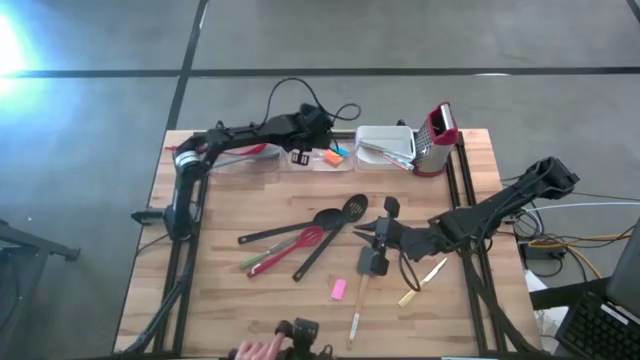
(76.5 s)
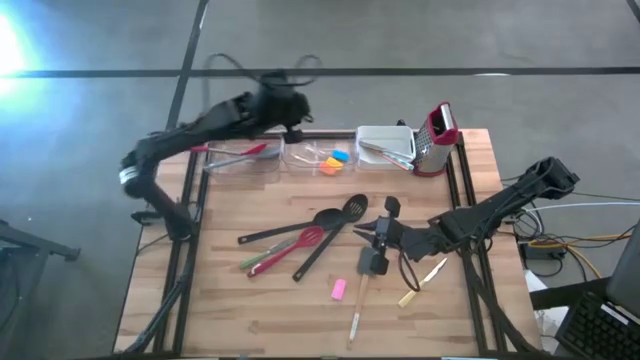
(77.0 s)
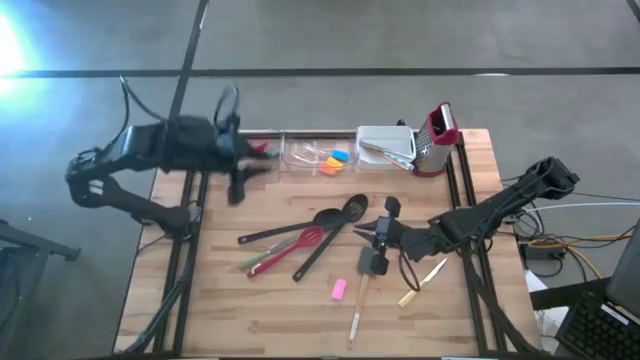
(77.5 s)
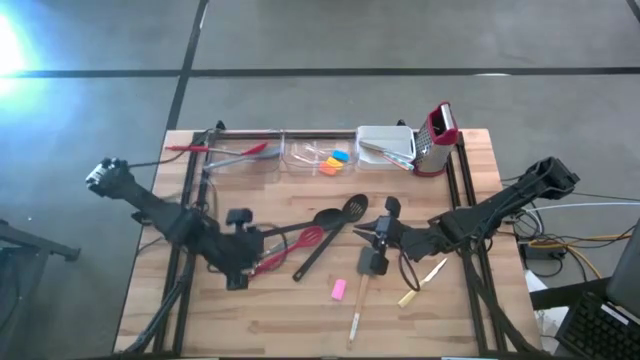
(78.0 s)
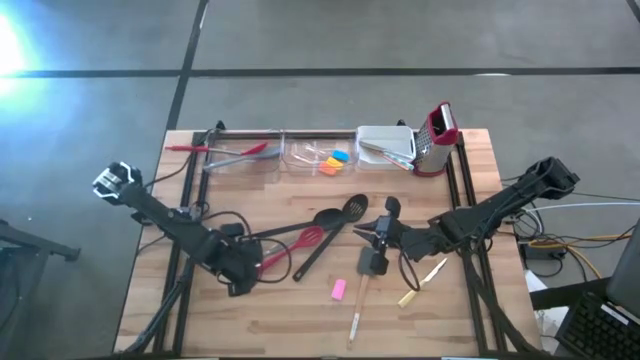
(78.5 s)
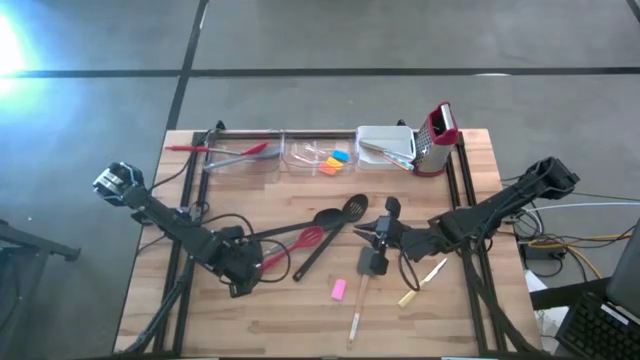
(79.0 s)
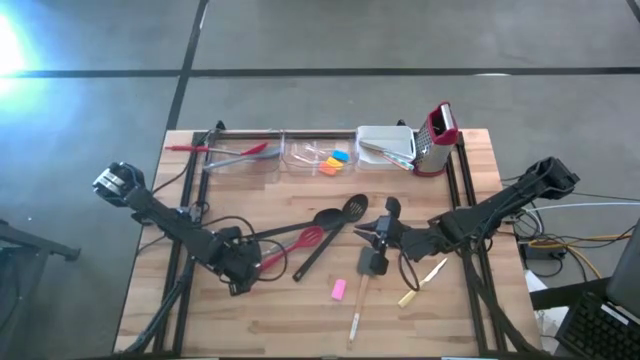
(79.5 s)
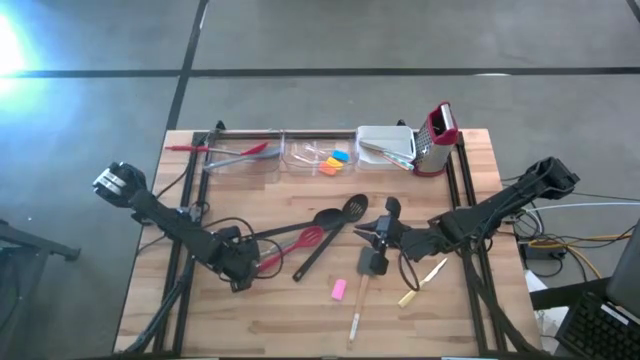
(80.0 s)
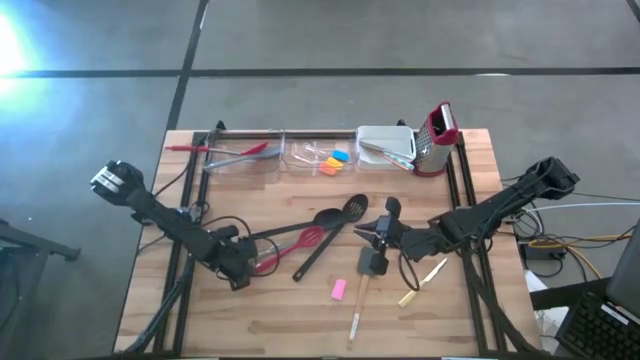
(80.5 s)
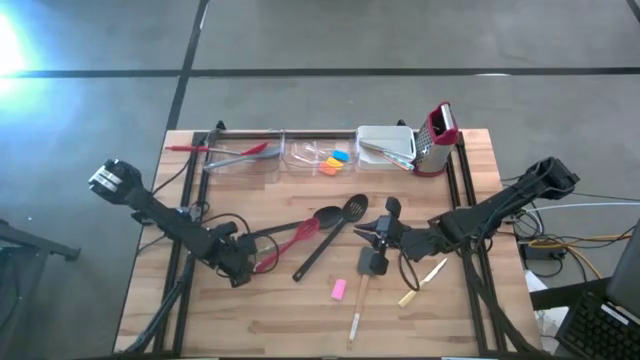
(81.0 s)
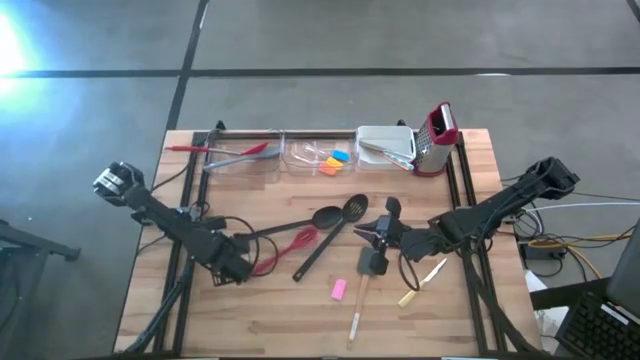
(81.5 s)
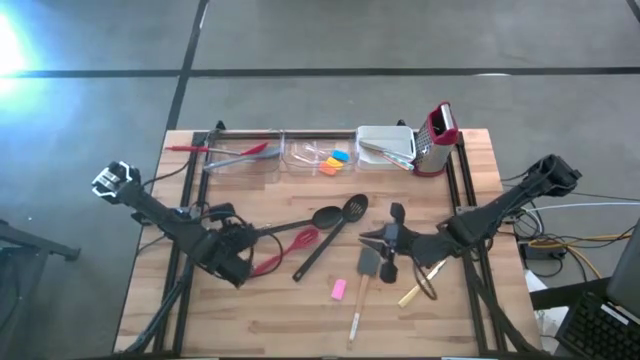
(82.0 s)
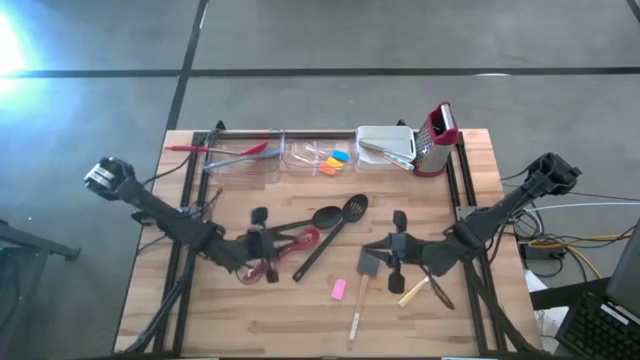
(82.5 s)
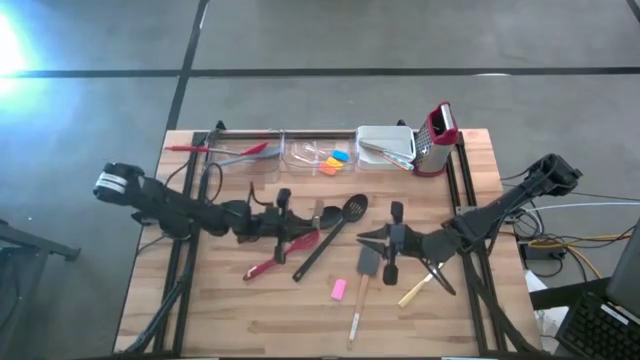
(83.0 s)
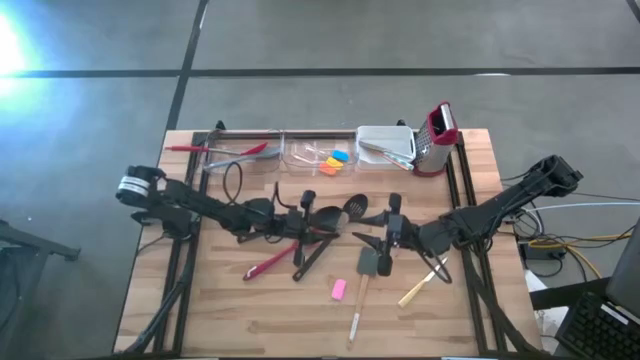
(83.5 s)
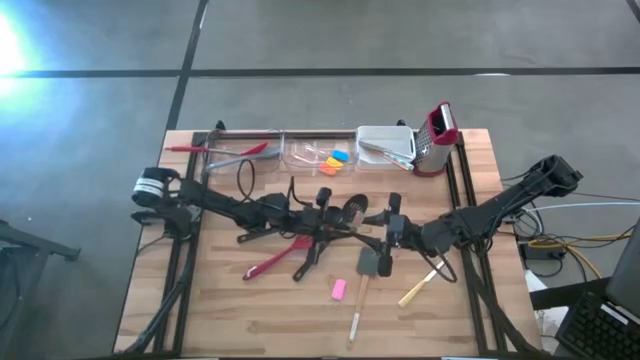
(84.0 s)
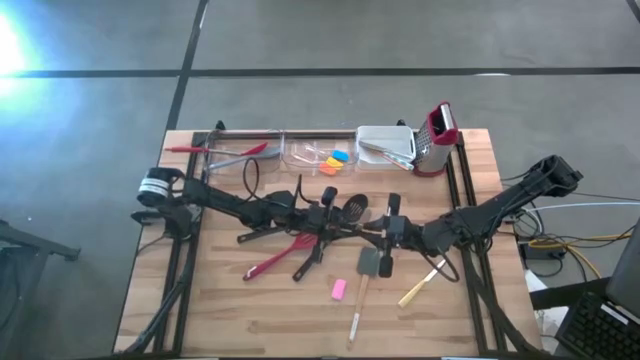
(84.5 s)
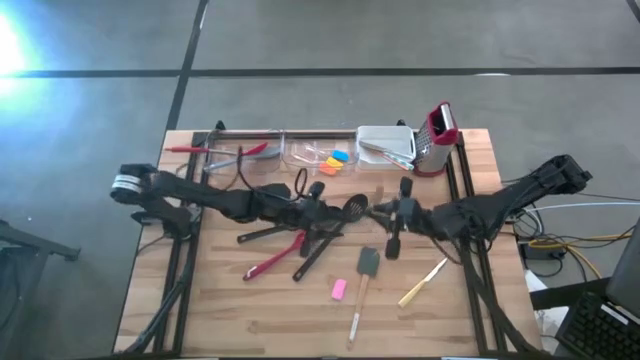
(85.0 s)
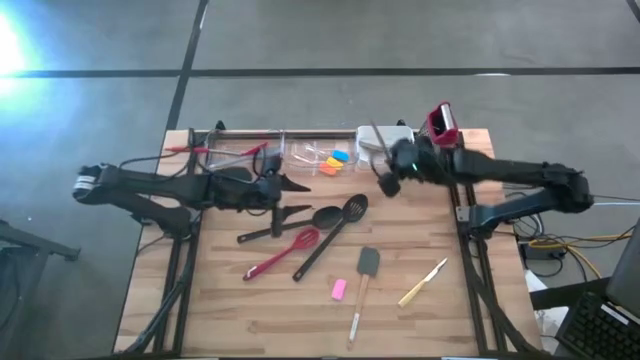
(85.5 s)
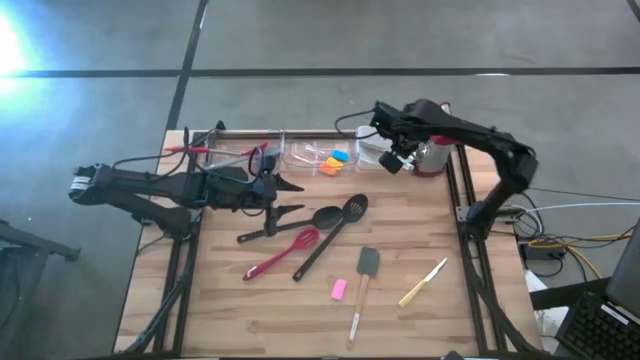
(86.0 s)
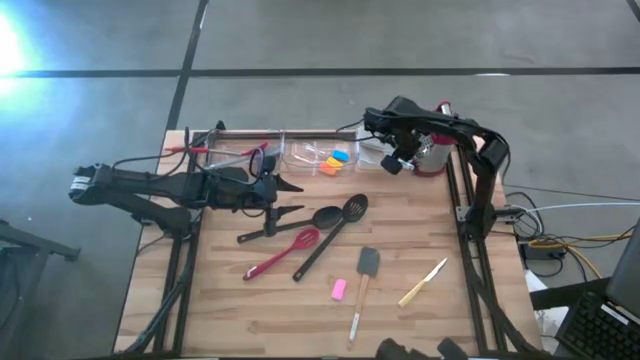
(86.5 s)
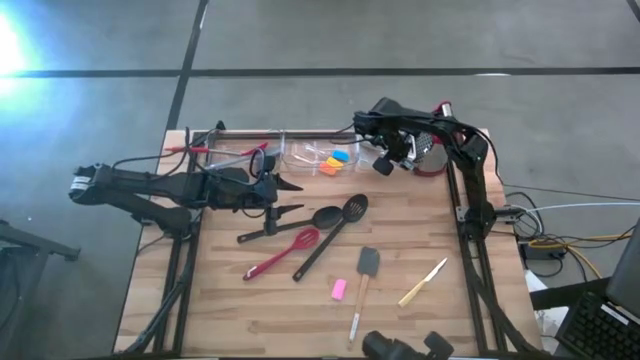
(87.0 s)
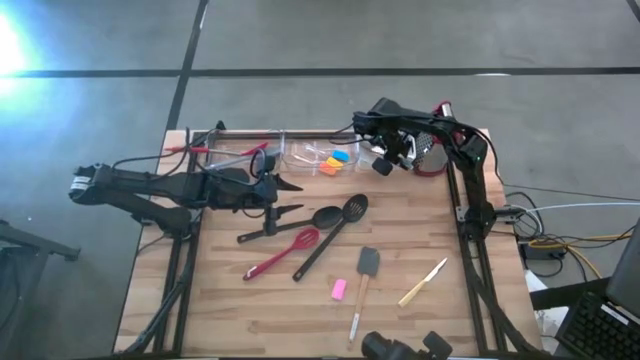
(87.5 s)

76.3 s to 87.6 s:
Task: Pick & Place Kitchen Items
Put the green table knife into the white bin

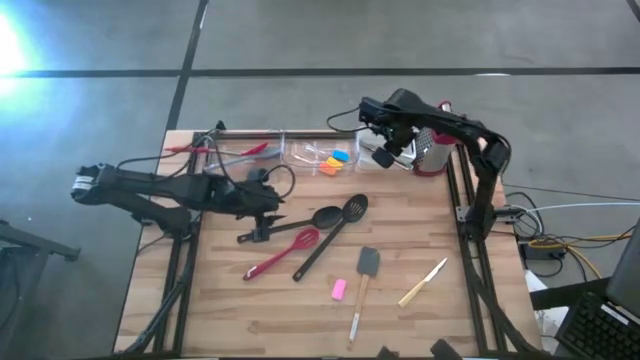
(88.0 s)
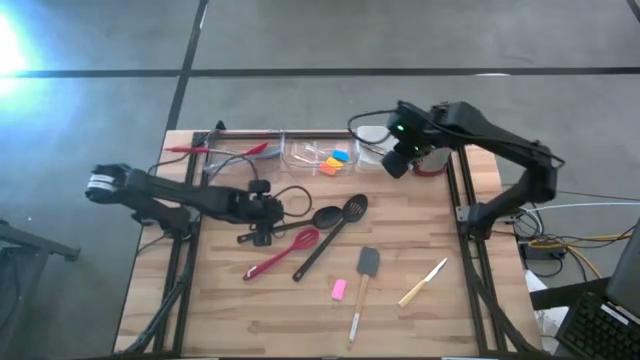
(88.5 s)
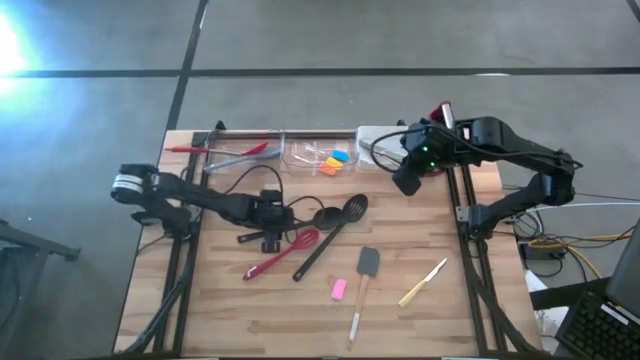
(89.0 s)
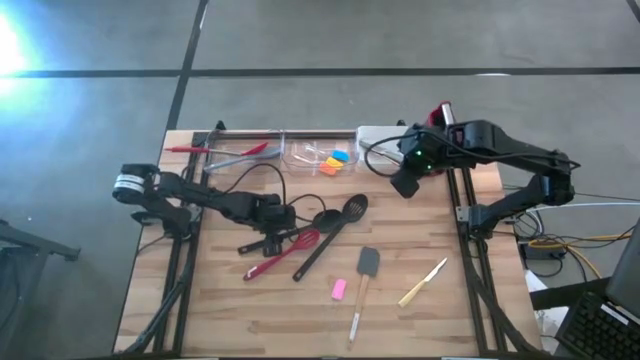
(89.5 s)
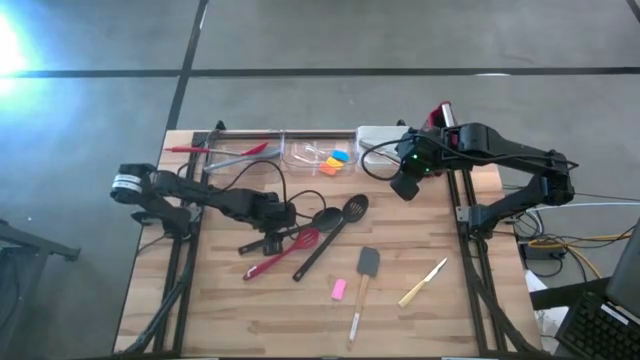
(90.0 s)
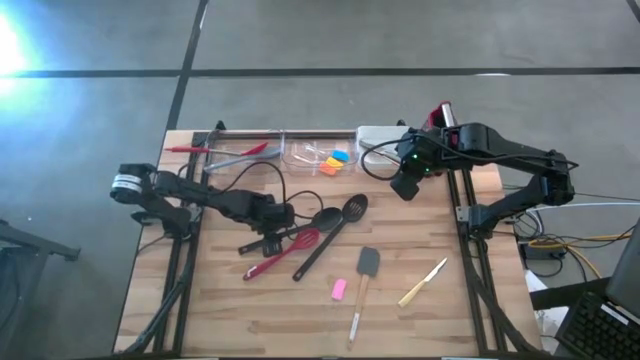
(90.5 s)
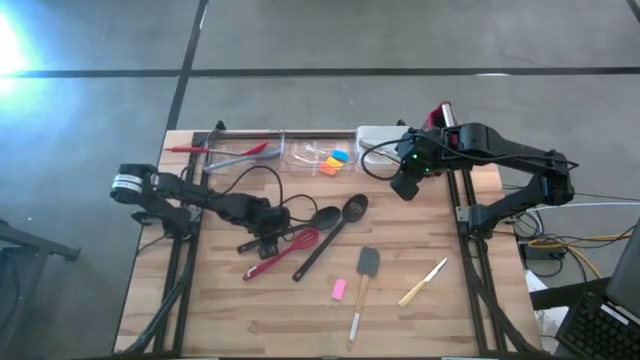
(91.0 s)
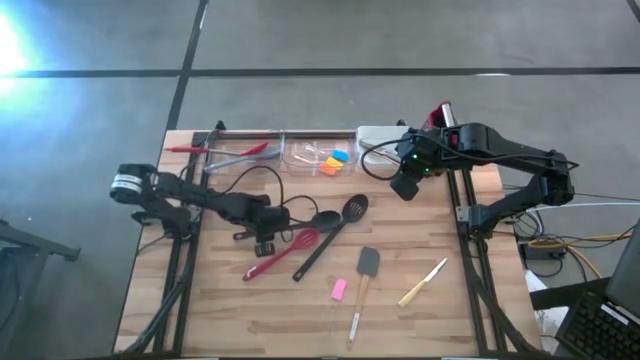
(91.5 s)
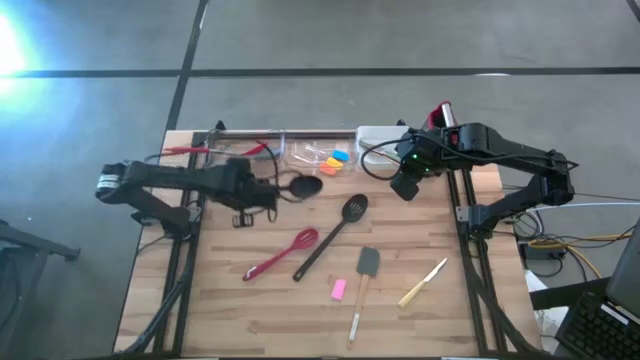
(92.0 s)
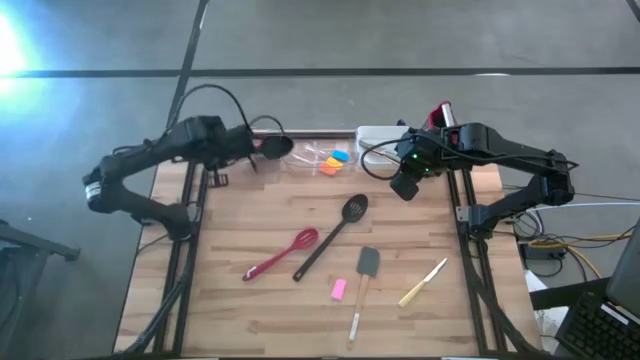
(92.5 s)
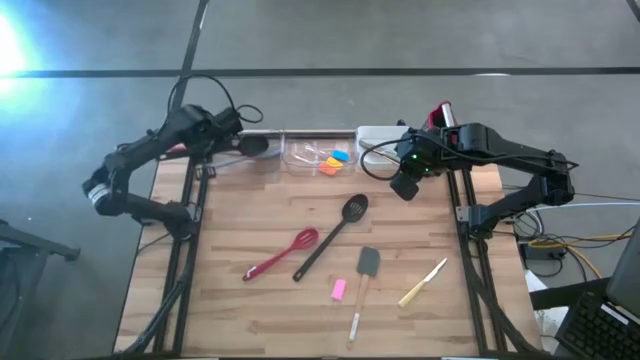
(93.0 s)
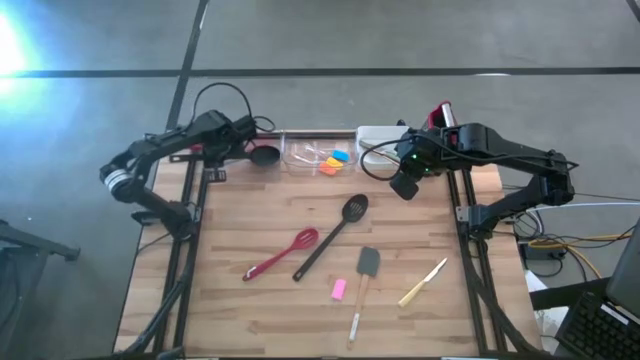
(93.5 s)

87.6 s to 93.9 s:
Put the left black serving spoon into the left transparent bin

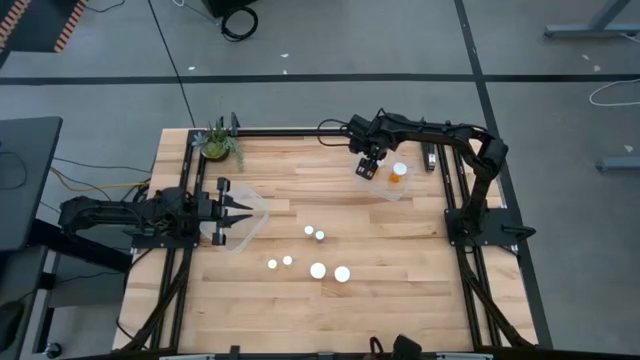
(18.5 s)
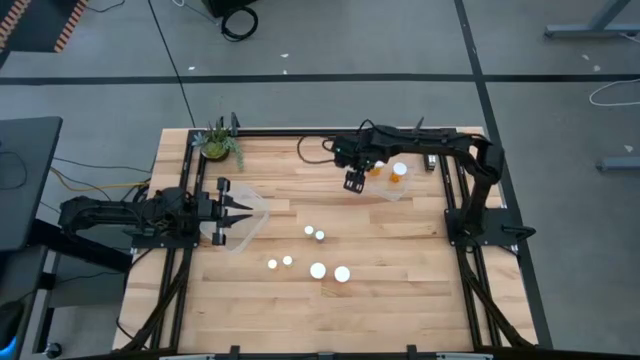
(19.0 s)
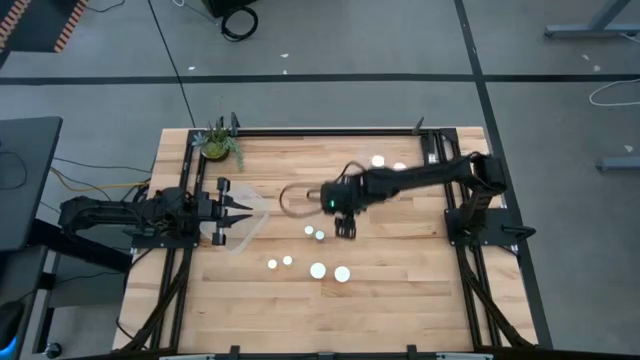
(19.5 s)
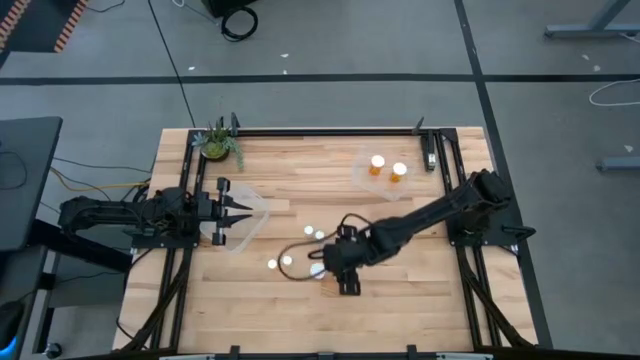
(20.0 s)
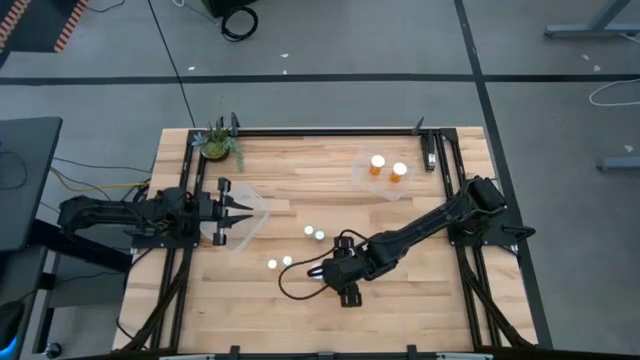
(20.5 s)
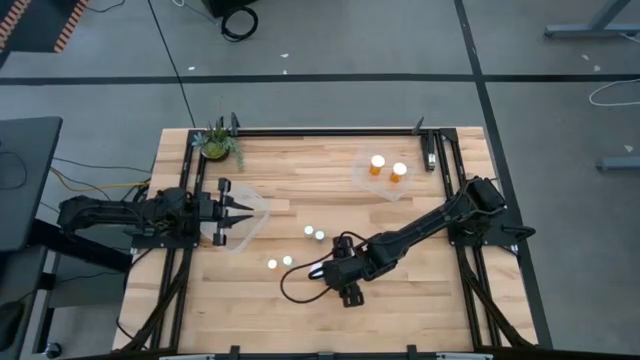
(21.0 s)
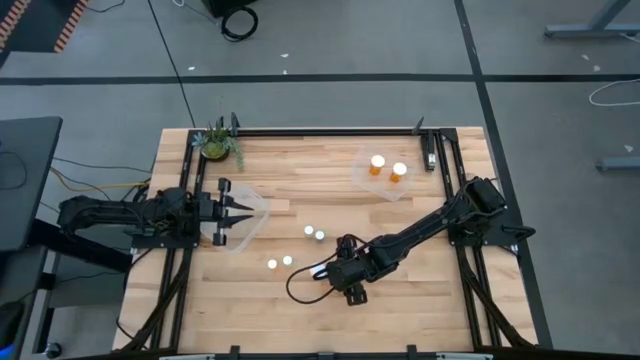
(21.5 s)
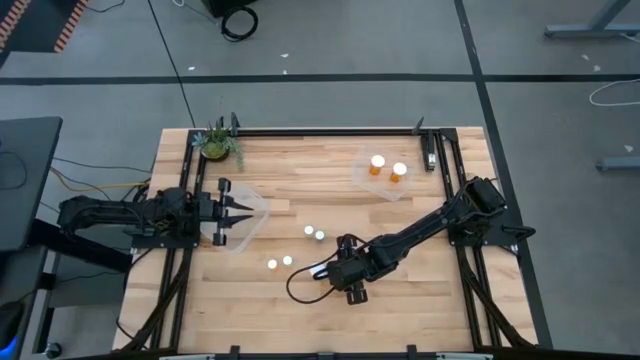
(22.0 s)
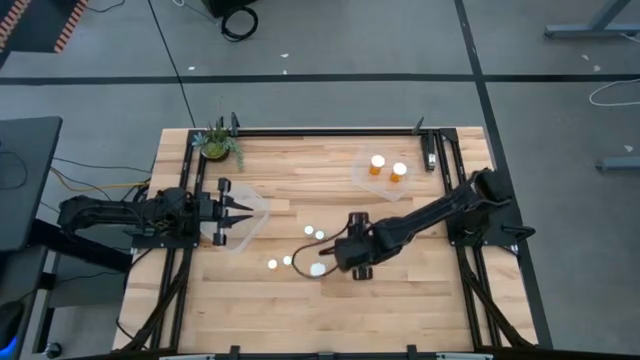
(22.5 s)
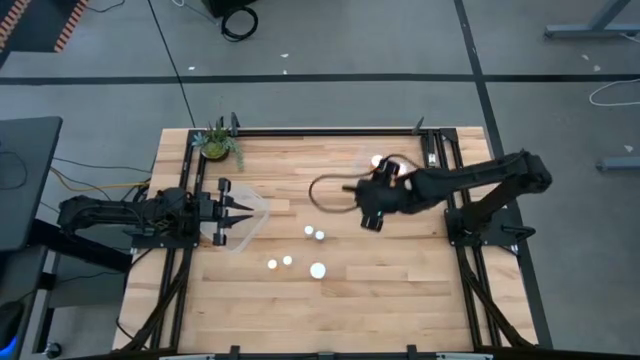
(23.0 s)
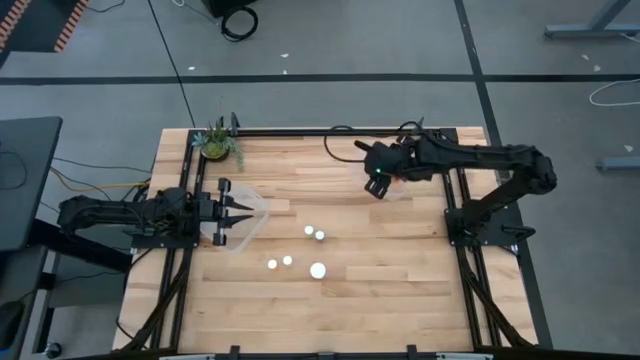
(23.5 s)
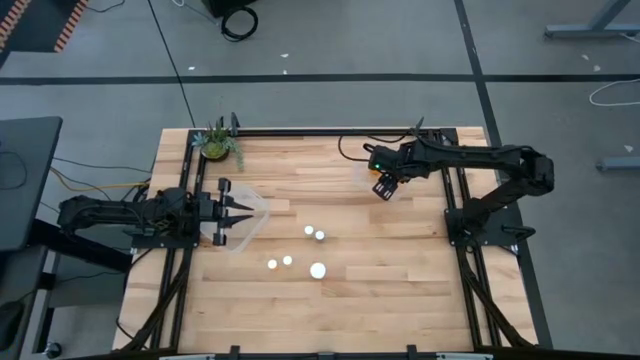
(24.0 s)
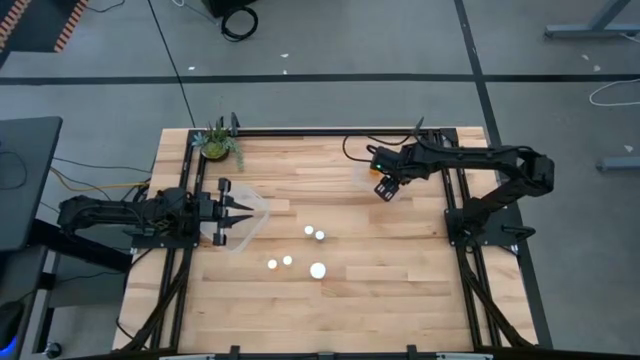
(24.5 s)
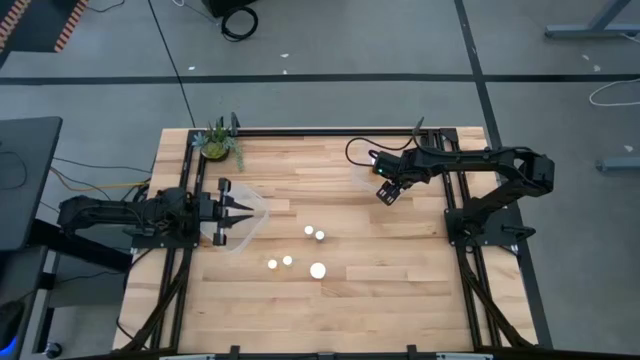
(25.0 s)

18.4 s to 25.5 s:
Task: Pick and place medicine bottles into bin by pill shape (circle, oval)
Put the large orange pill bottle into the right transparent bin
